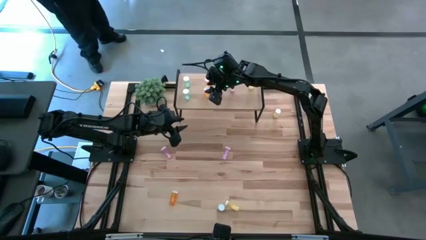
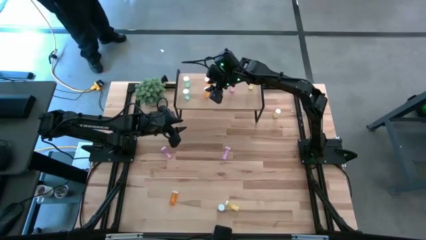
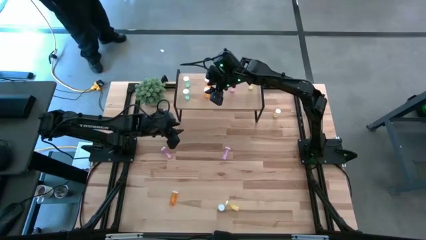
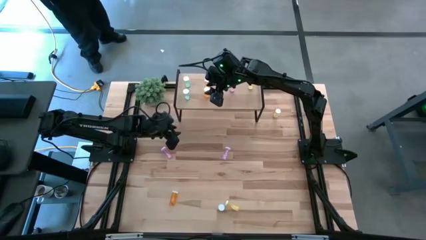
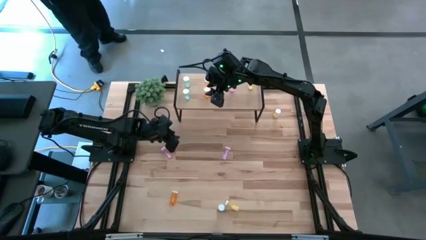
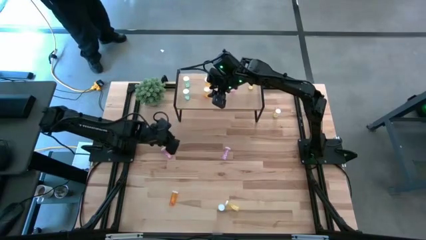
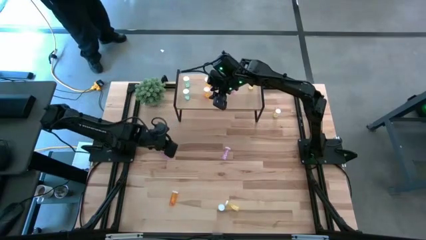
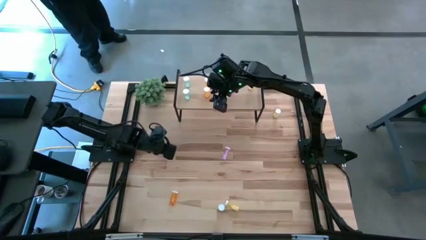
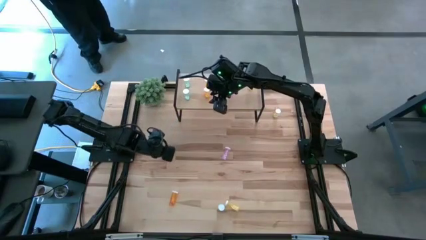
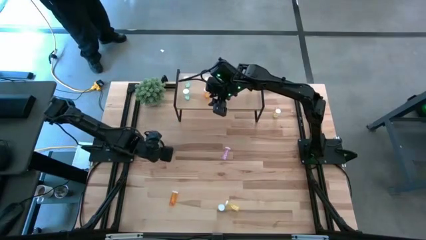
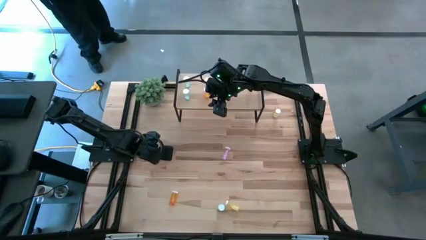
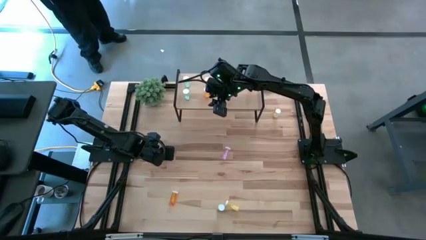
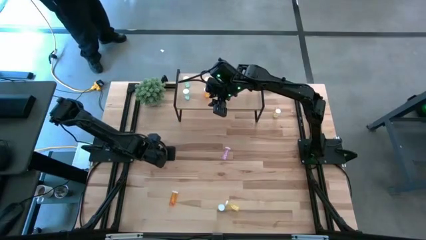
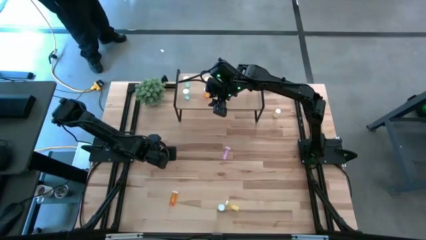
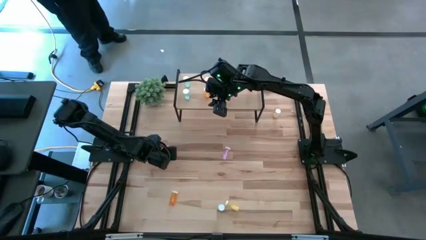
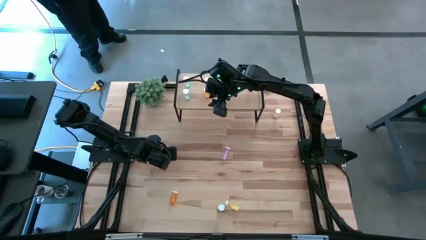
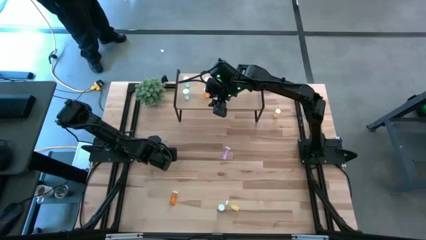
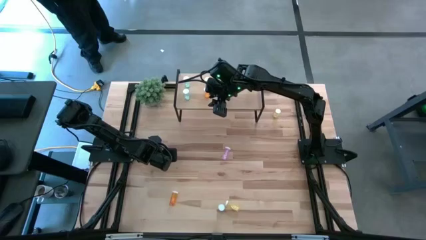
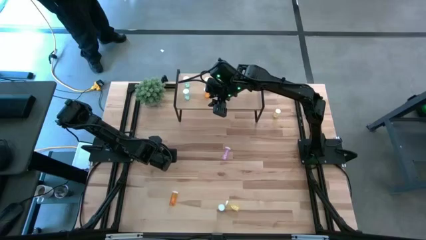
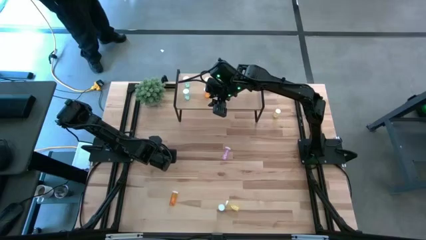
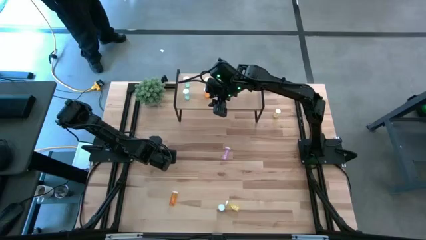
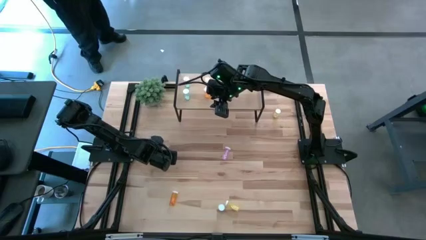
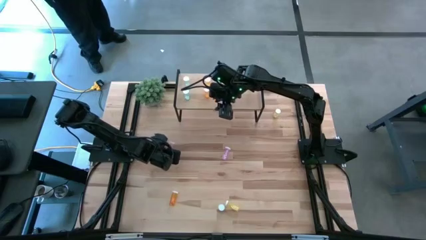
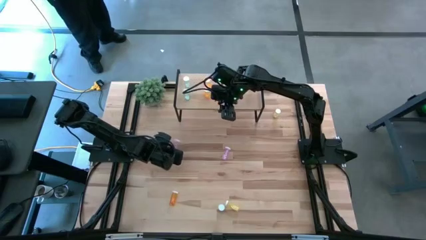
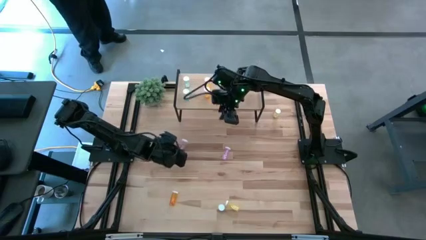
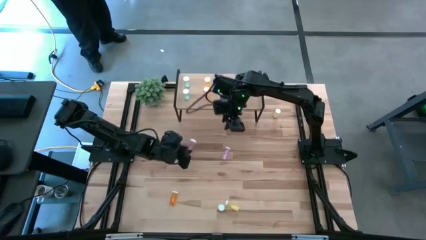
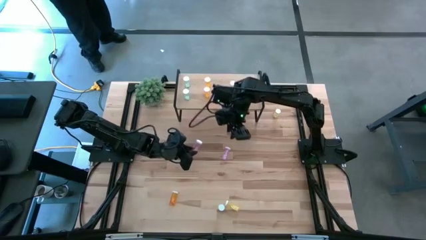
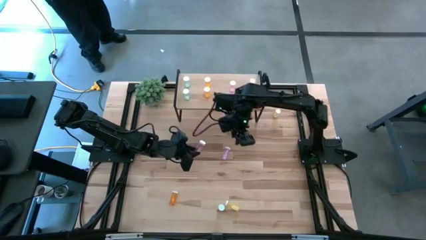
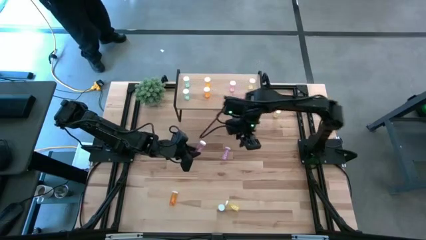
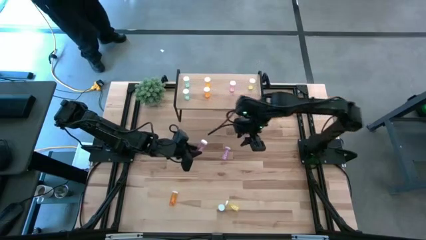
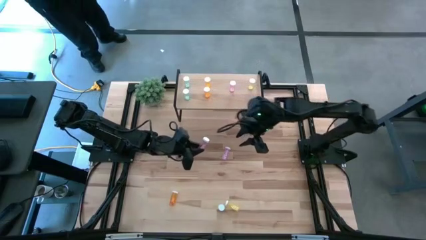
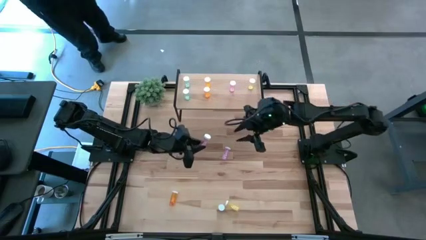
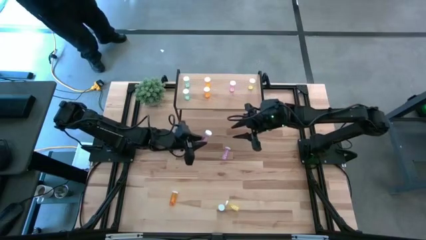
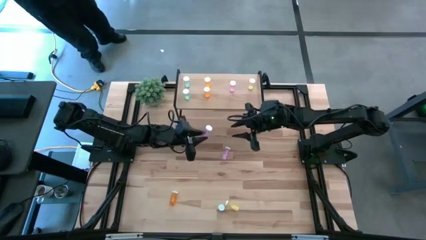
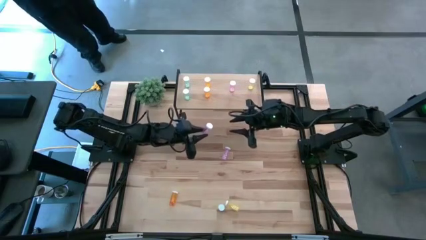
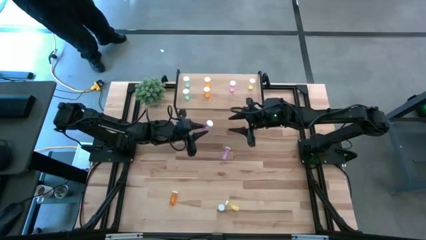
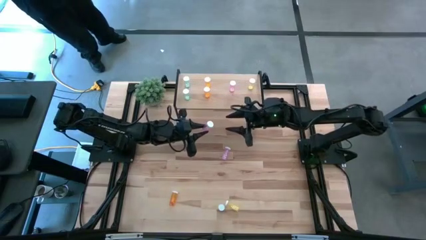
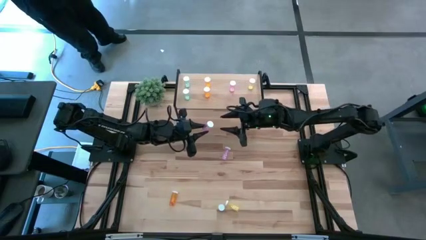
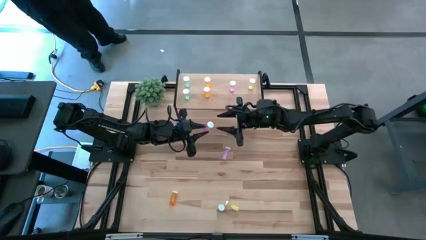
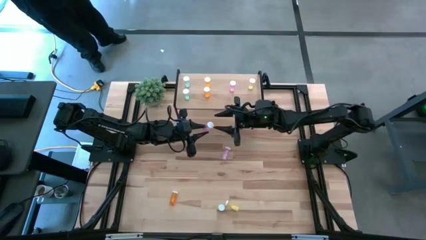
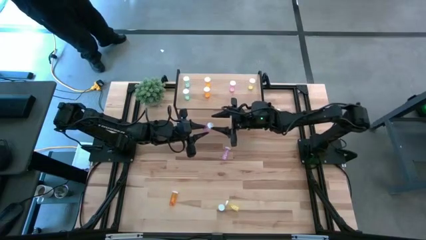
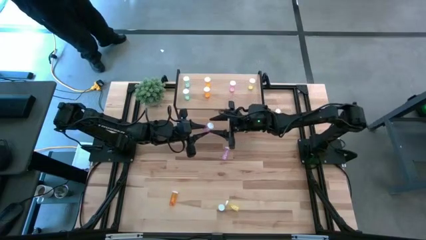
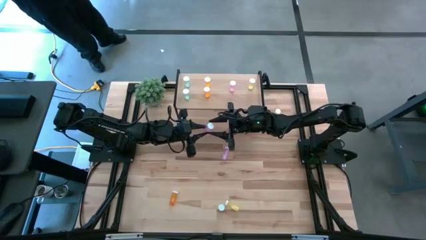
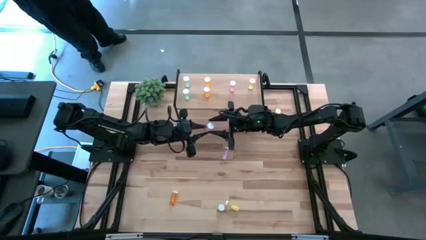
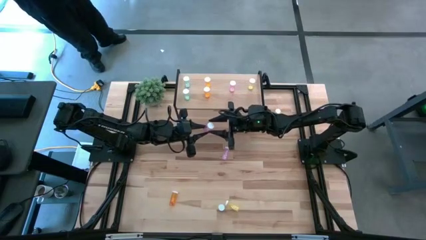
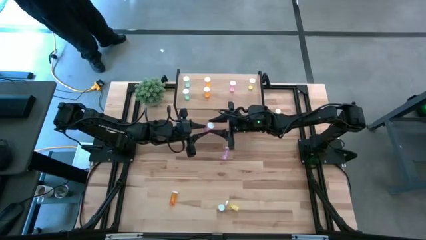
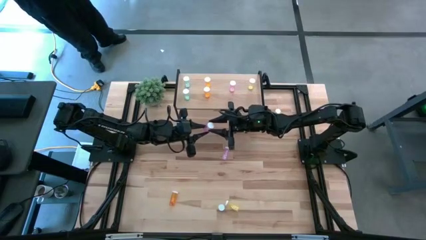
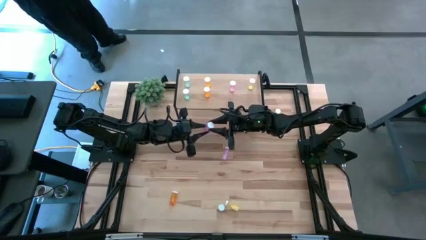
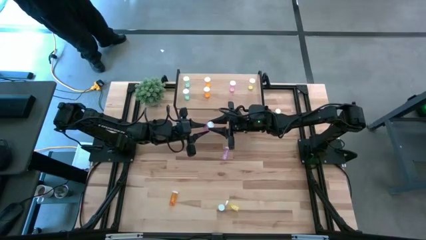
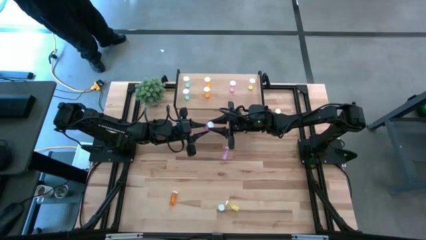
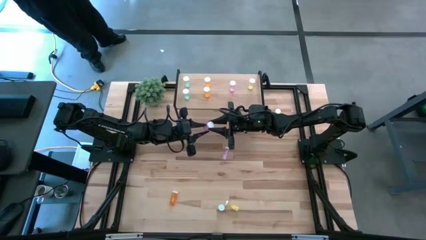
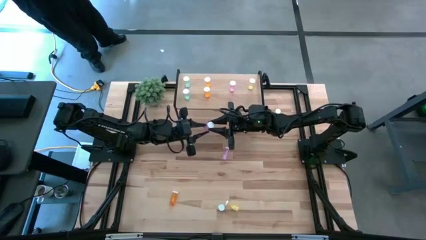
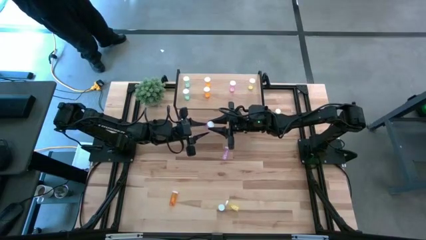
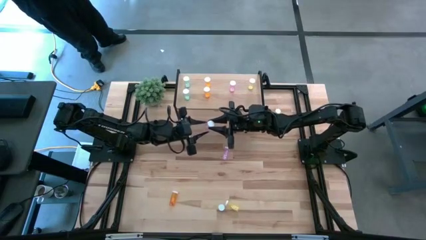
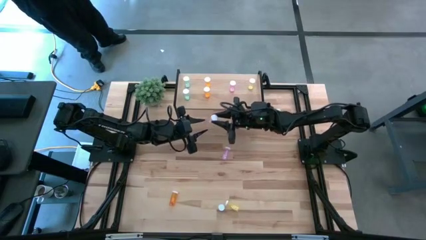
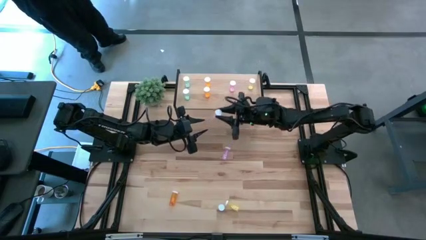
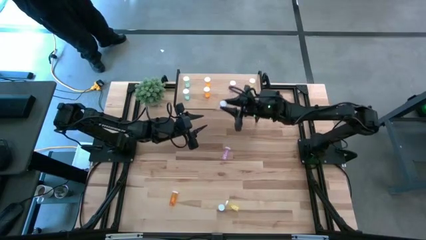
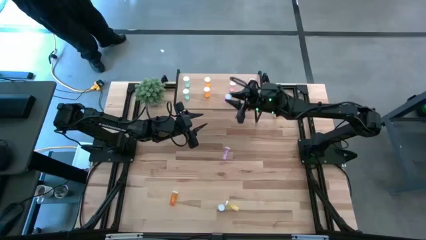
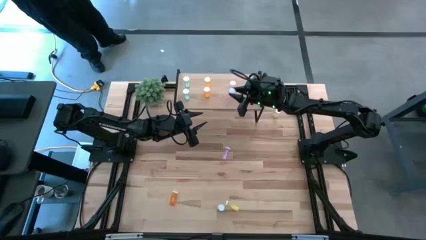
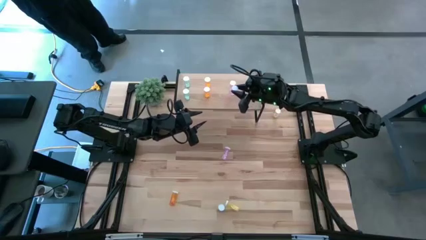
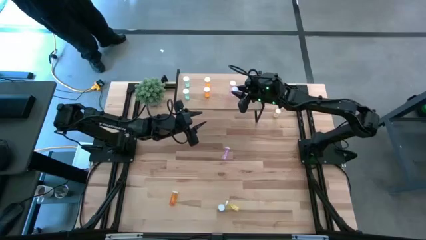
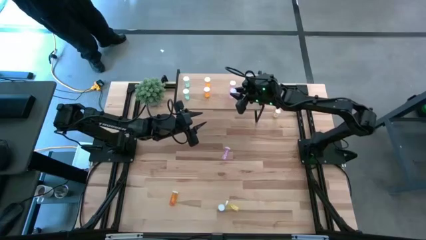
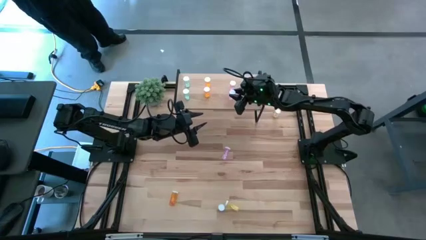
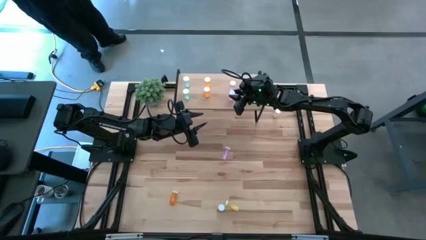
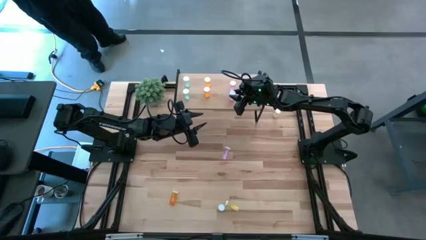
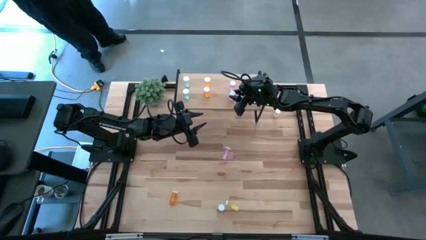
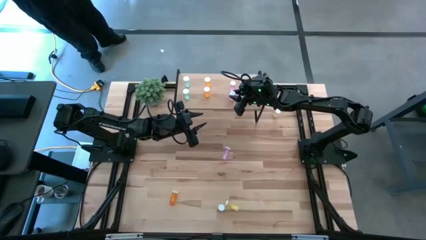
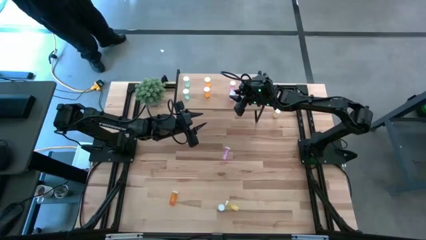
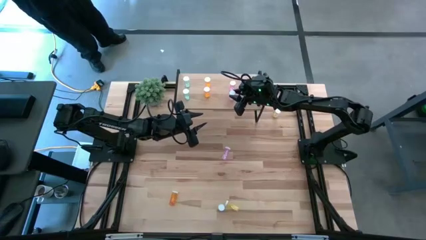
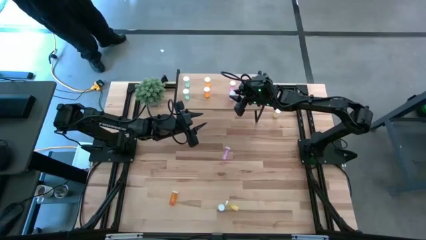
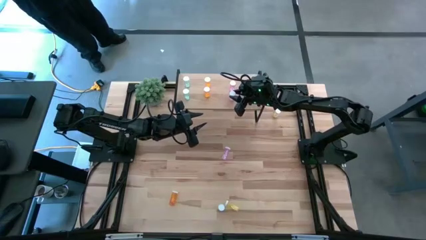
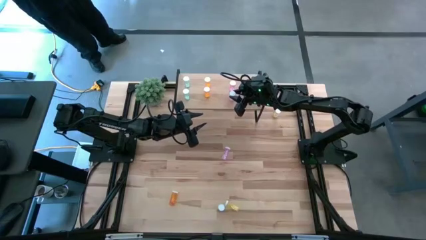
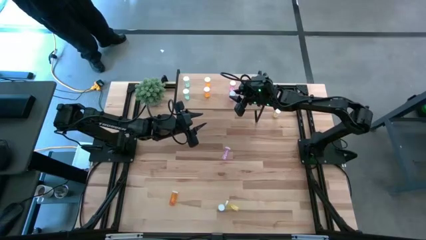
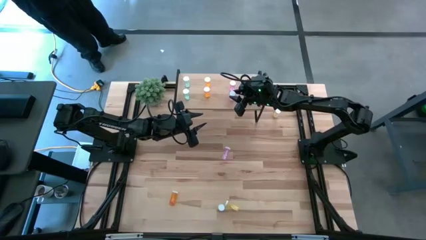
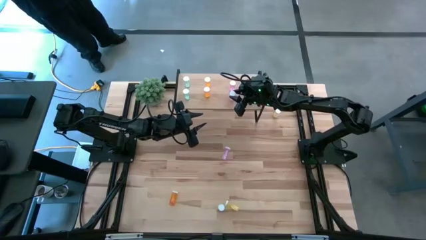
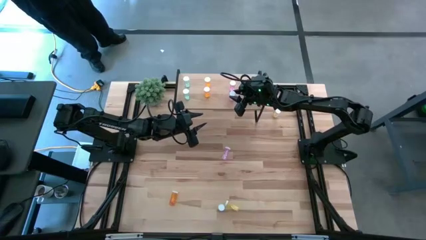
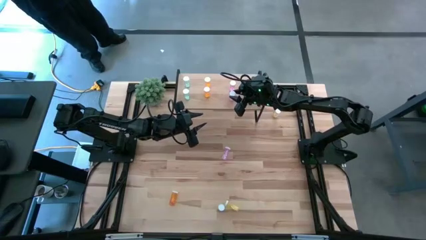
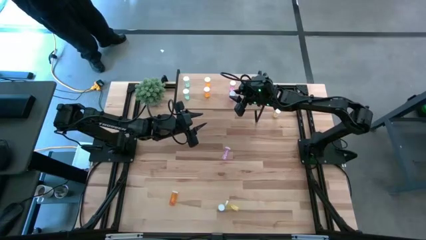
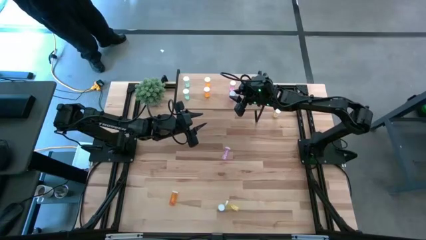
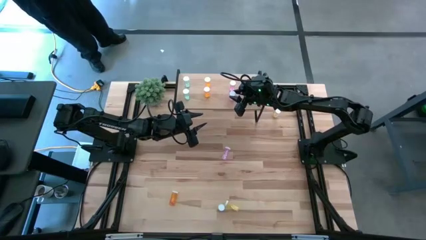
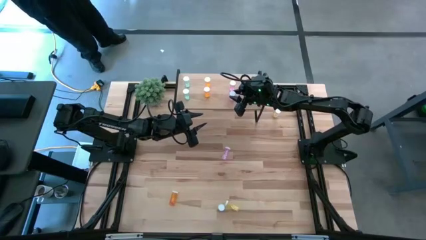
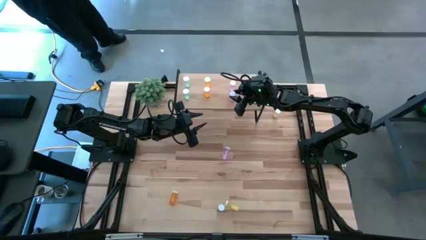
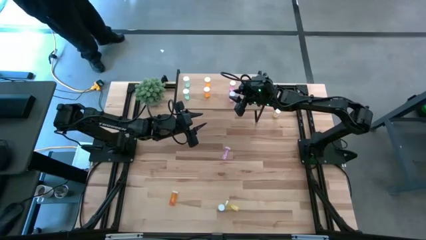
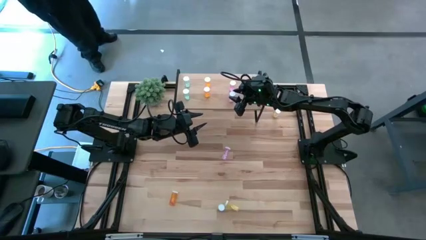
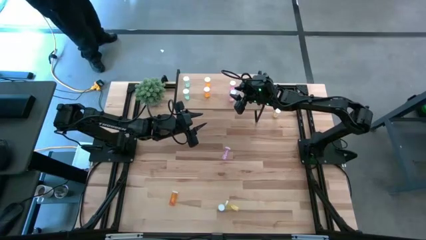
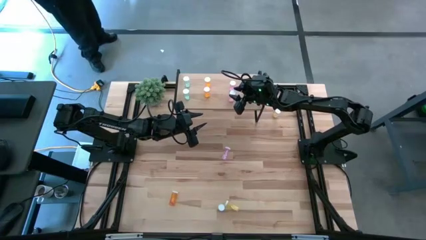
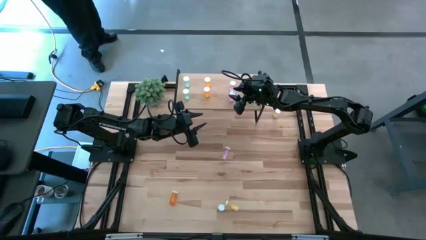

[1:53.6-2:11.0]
Task: Pick and place medicine bottles onto shelf by color
Put the left purple pill bottle on the shelf aligned with the purple pill bottle

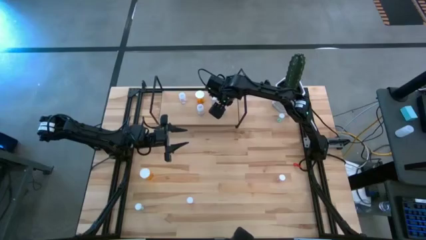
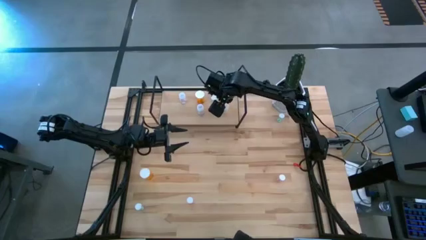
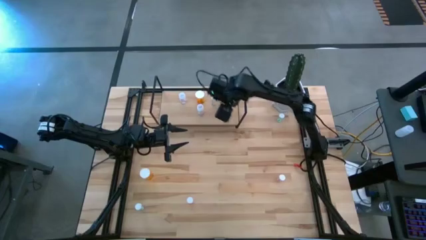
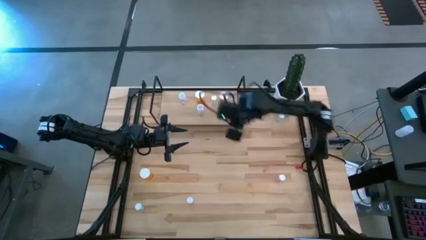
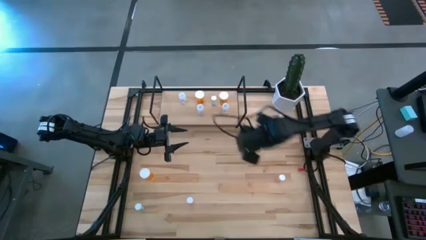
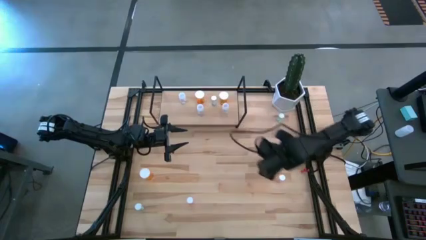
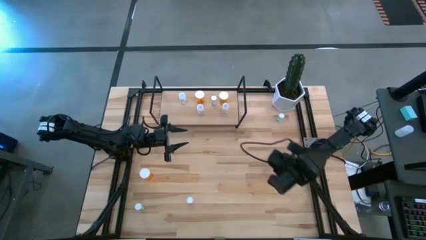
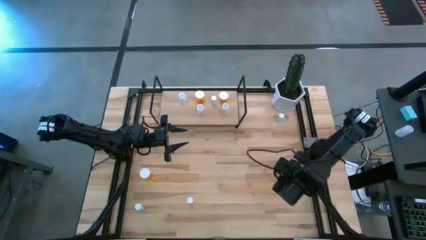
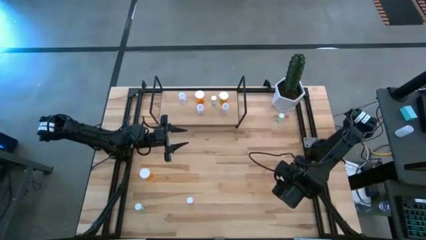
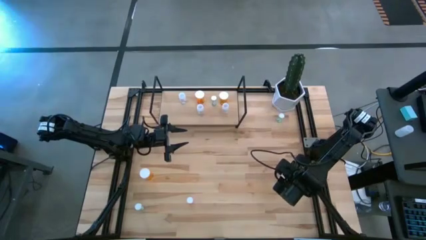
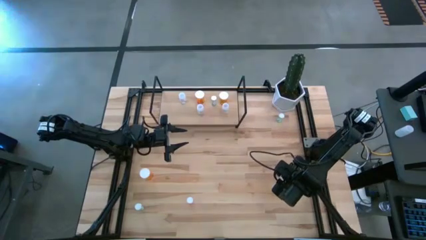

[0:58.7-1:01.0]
Task: Pick and place medicine bottles onto shelf by color
Put the middle pink pill bottle on the shelf
